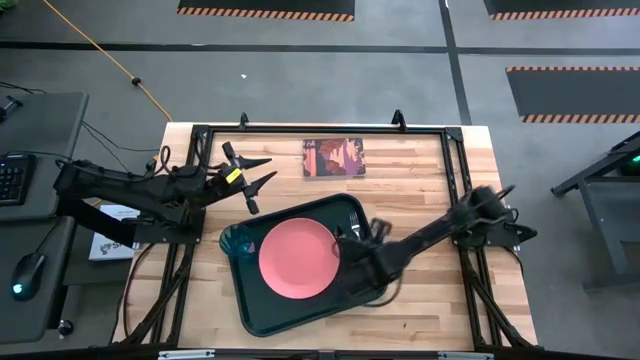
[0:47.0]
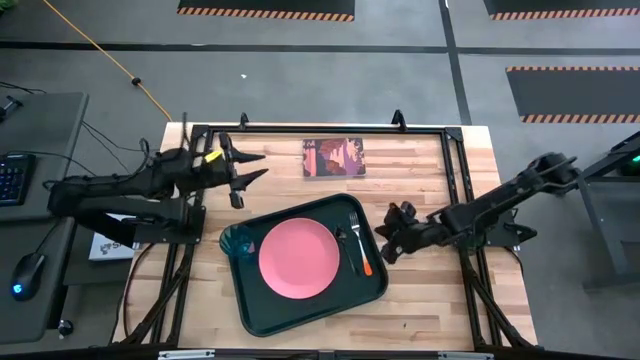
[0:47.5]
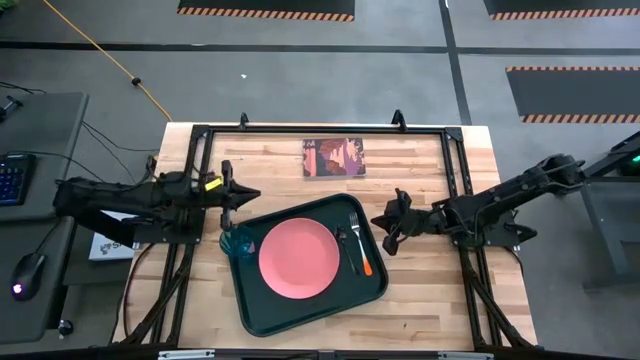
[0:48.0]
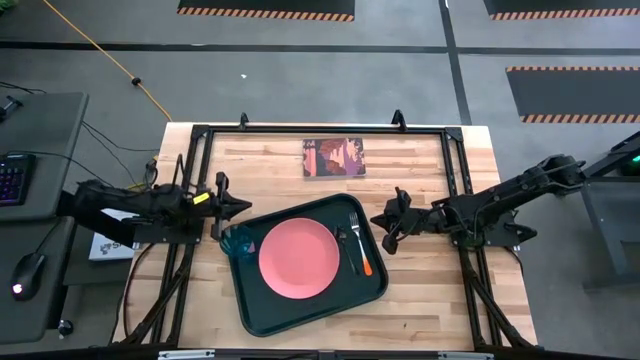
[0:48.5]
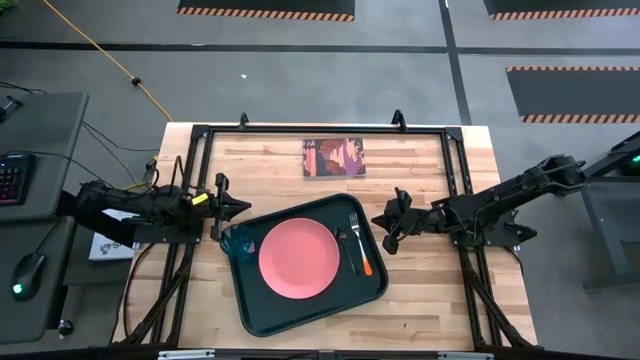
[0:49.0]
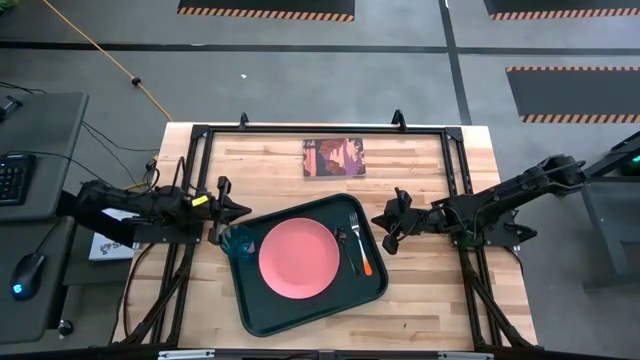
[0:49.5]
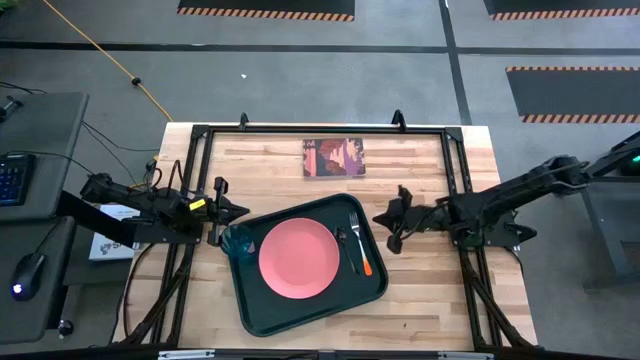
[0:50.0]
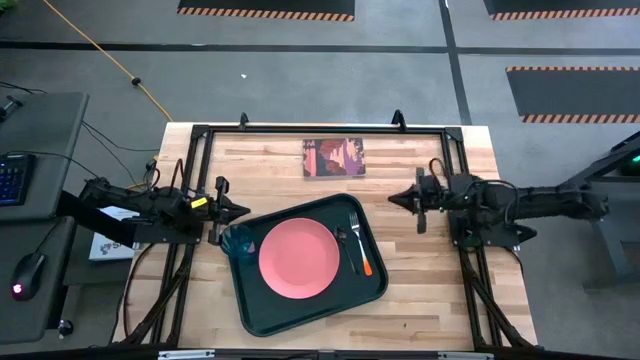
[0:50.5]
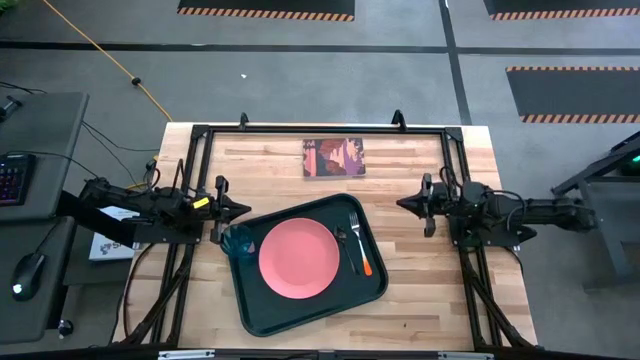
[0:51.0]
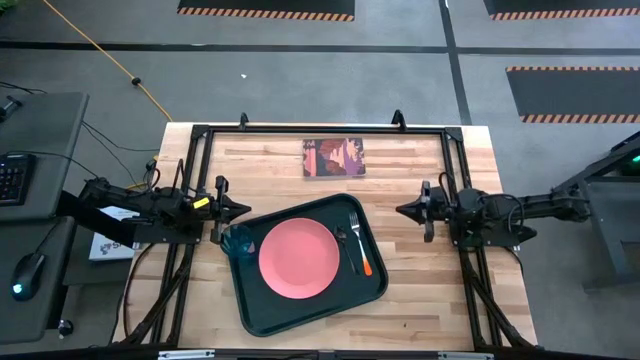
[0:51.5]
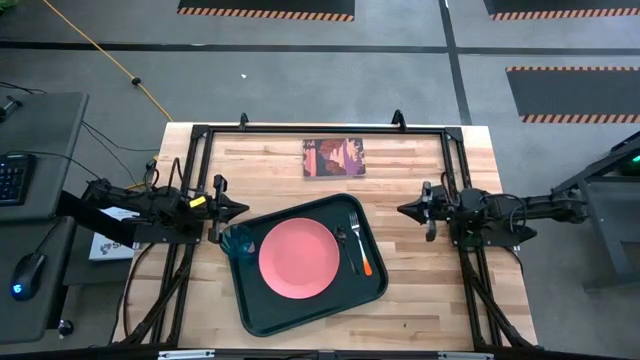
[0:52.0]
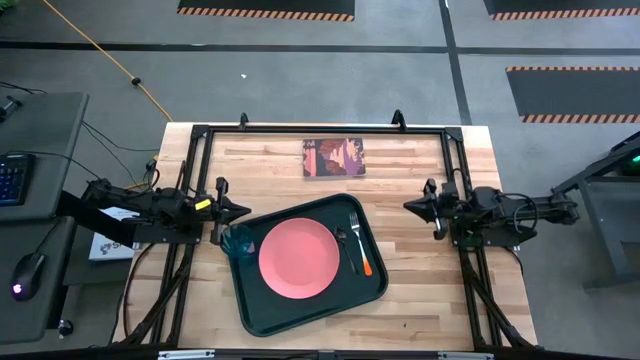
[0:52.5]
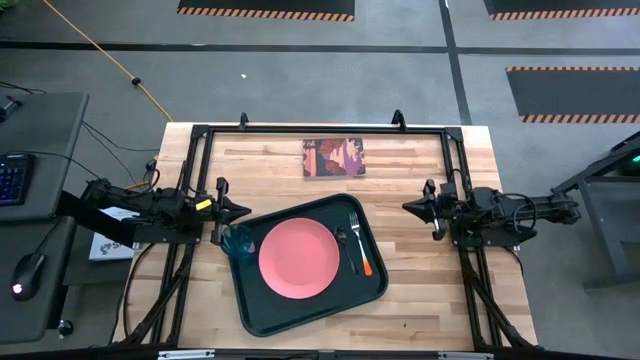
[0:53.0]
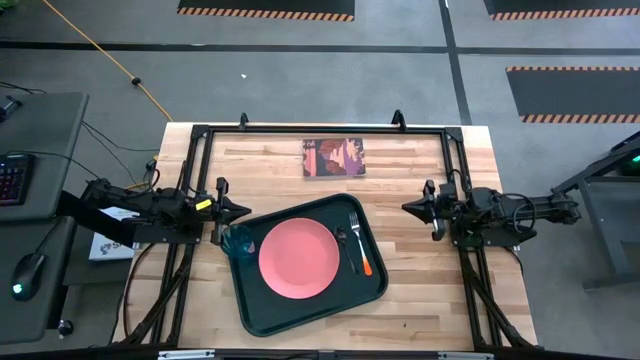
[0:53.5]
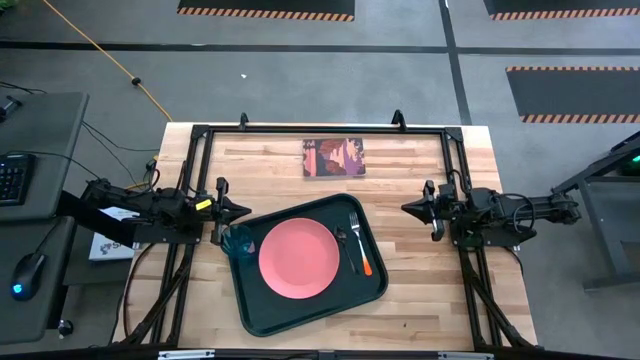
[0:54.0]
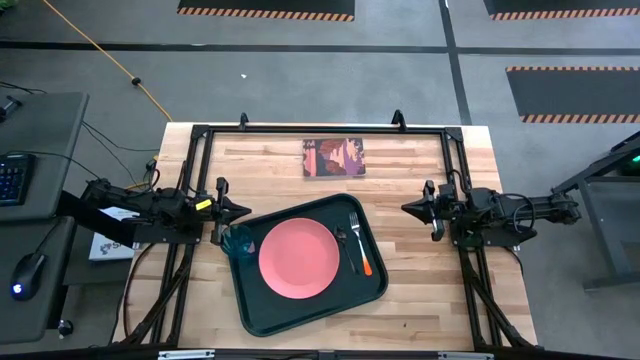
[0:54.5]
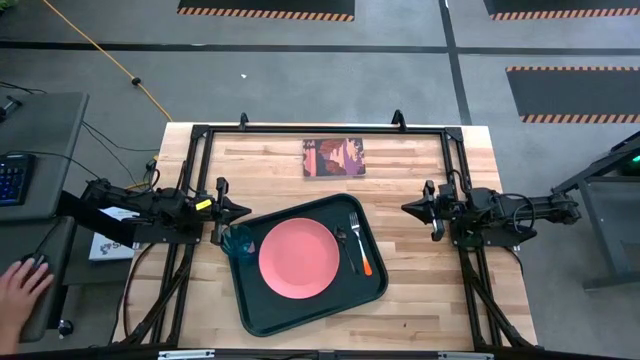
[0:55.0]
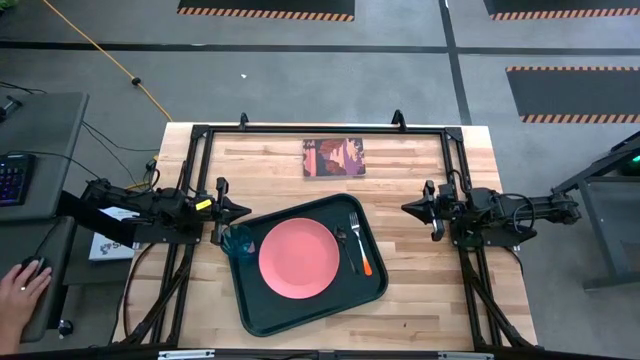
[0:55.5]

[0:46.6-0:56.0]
Task: Pick and place plate/cup/fork/spoon on tray
Return to Home Position

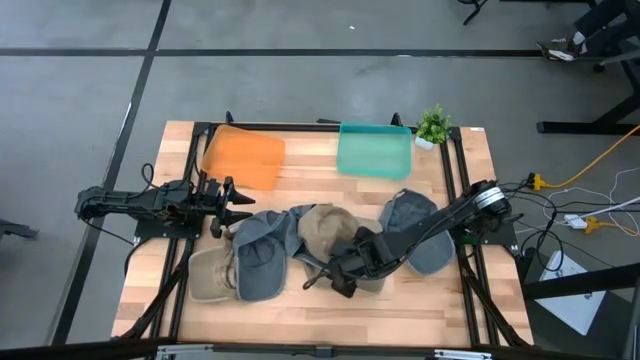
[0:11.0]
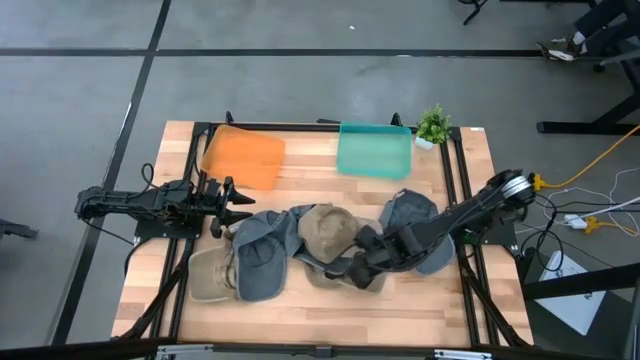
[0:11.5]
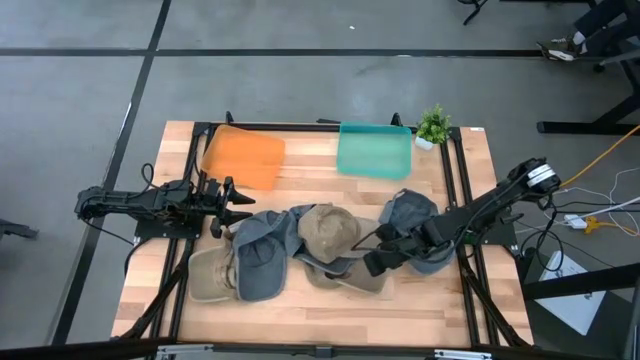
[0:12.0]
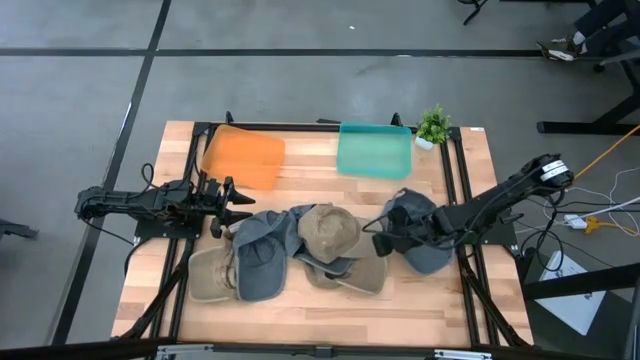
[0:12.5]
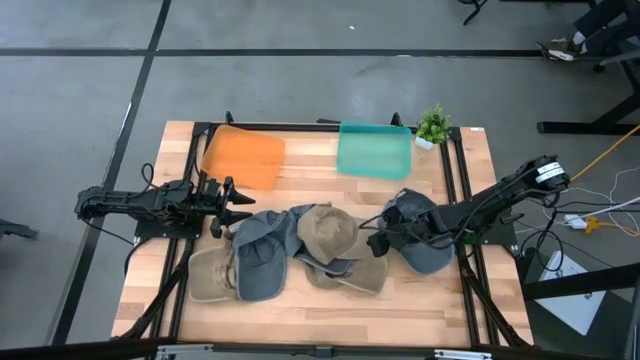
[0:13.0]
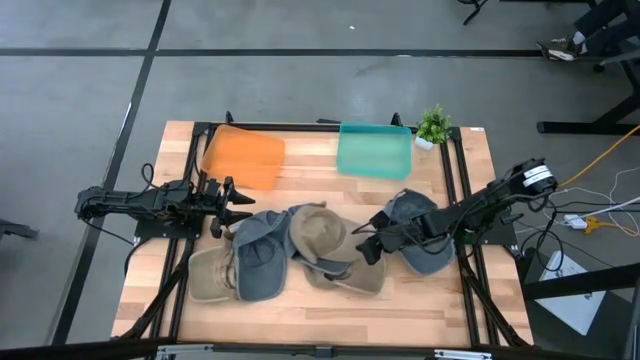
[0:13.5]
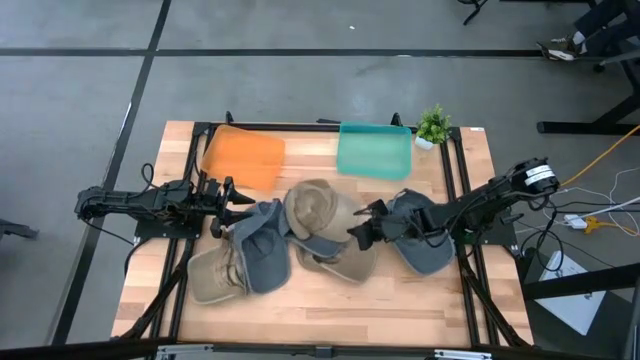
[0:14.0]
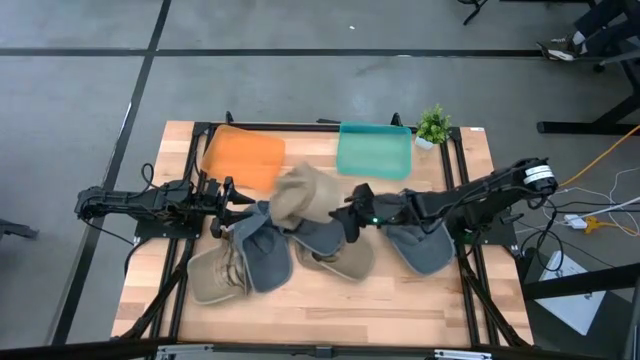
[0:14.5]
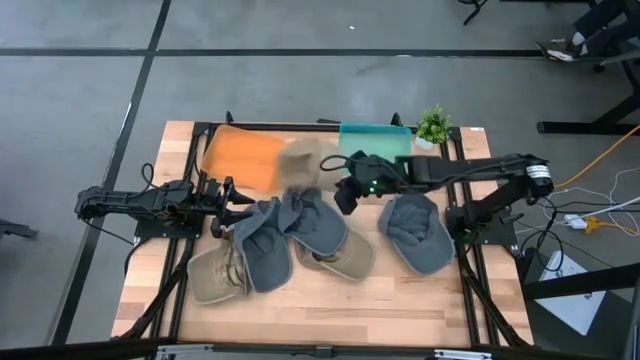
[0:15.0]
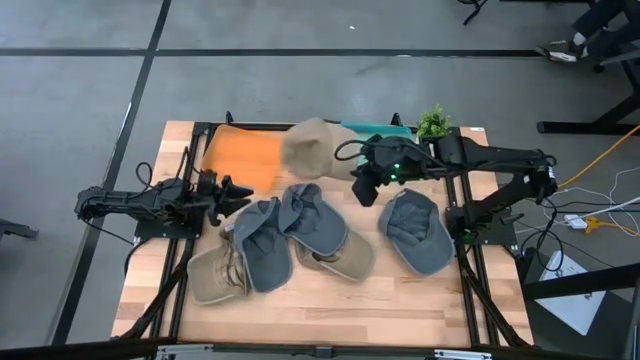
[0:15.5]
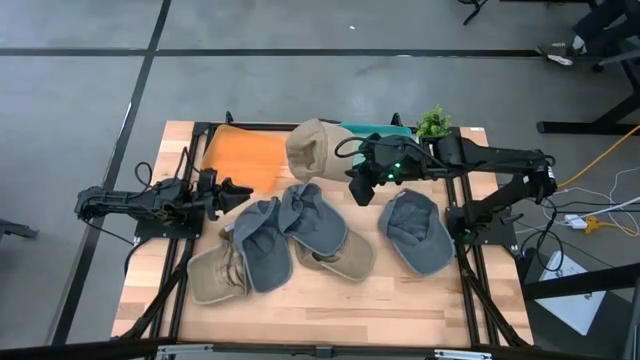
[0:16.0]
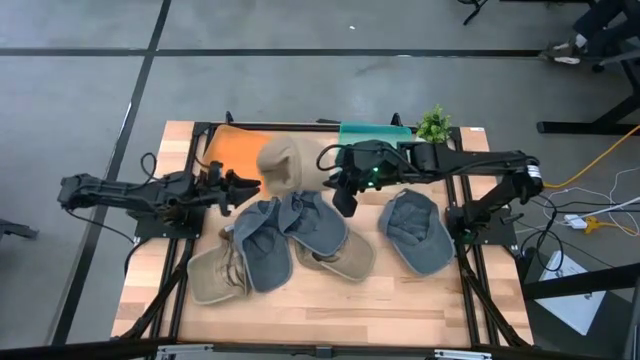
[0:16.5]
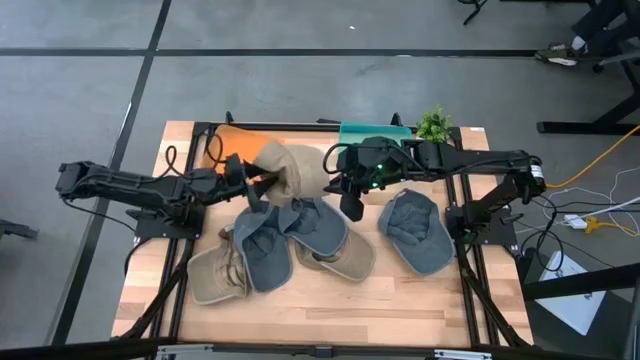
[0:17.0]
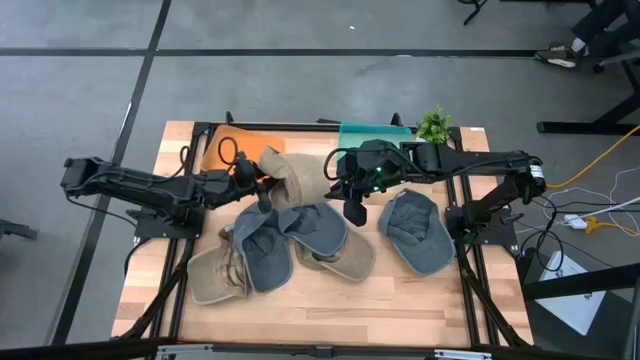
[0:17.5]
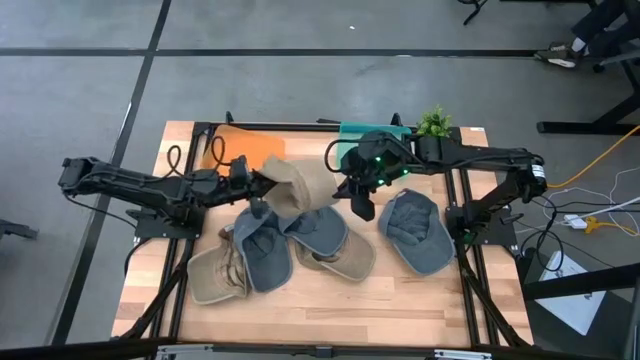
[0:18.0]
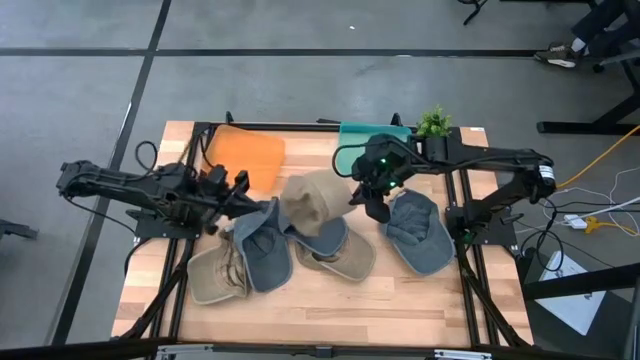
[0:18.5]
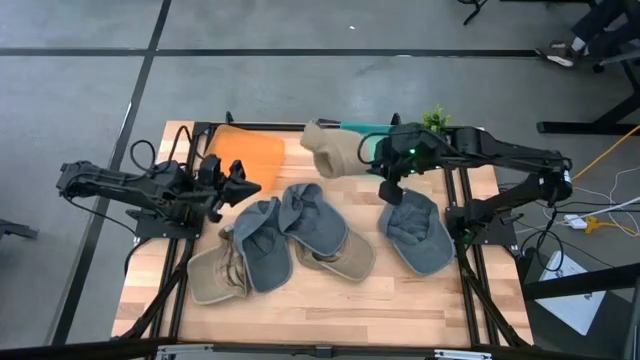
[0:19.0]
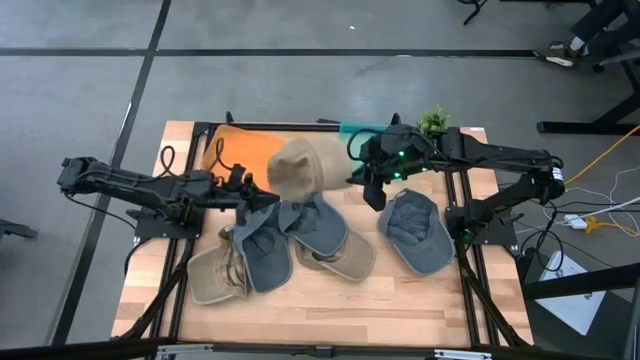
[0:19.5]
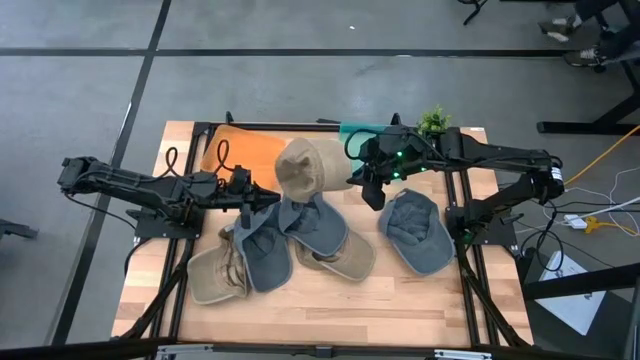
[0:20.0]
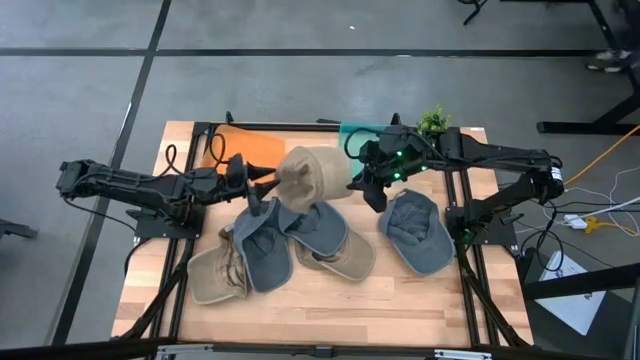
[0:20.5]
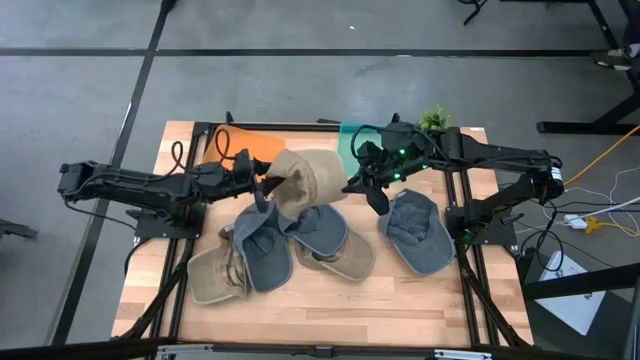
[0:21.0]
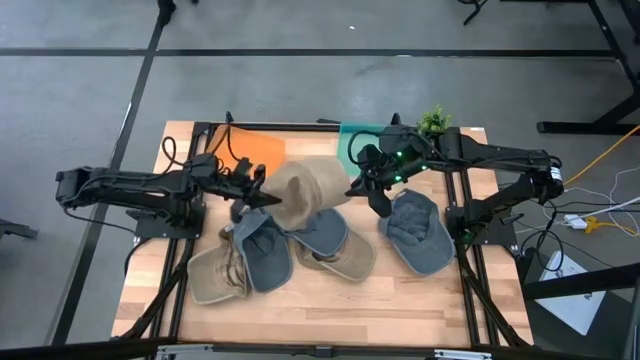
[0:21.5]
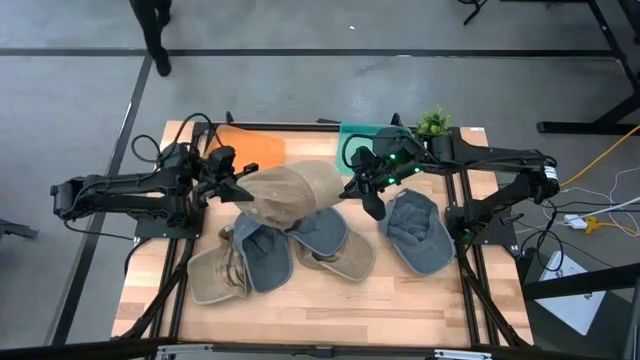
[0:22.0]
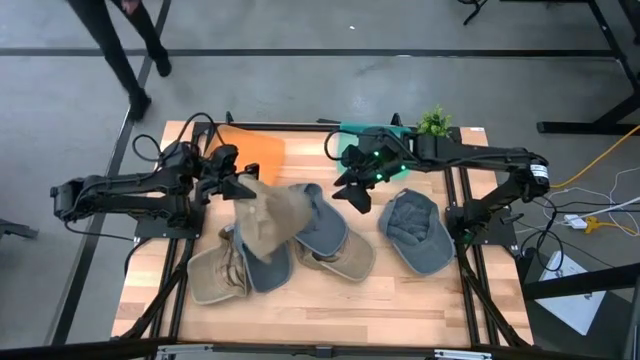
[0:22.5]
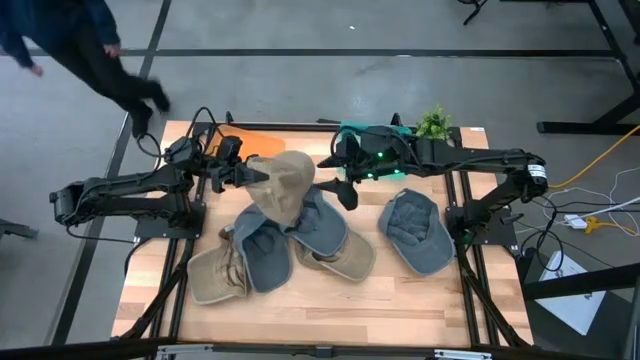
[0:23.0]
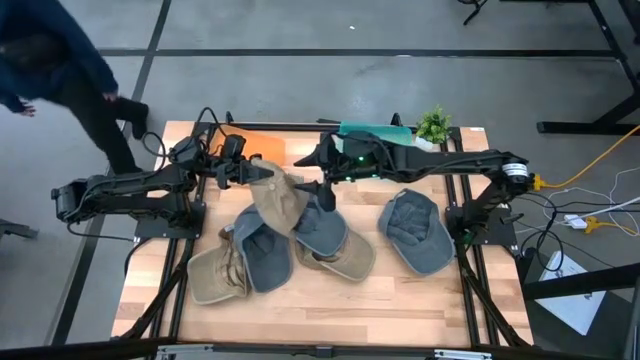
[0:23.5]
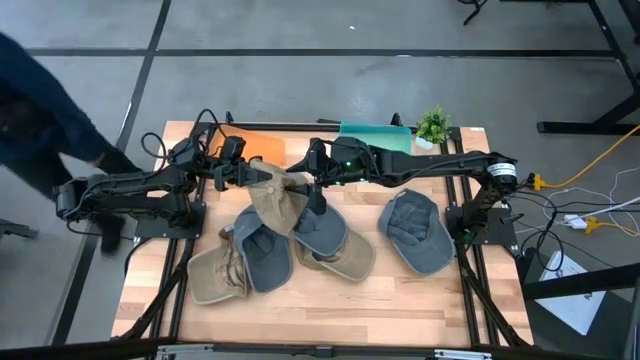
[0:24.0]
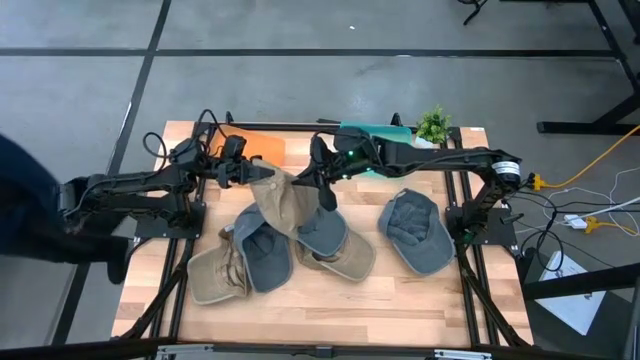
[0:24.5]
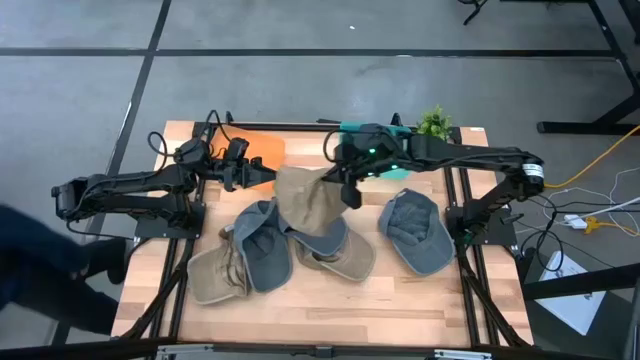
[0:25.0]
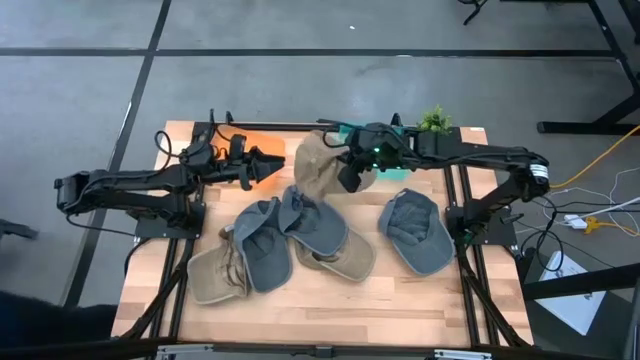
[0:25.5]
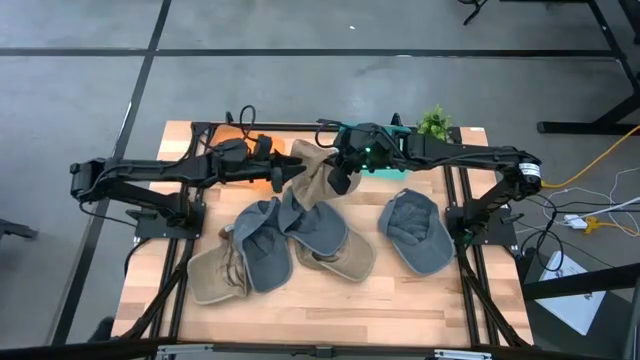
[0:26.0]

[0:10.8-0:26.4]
Task: Pick & Place hat
Put the top brown cap into the green bin
